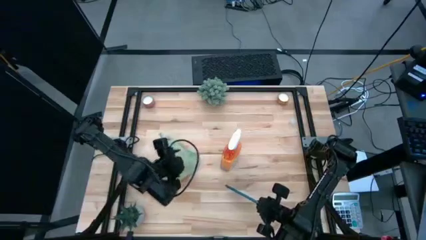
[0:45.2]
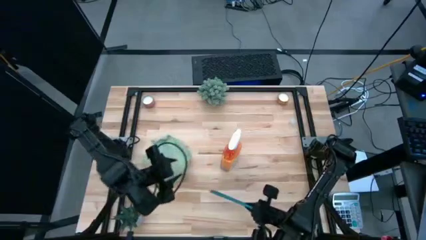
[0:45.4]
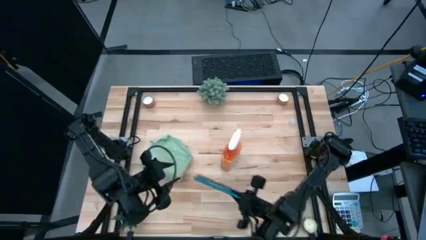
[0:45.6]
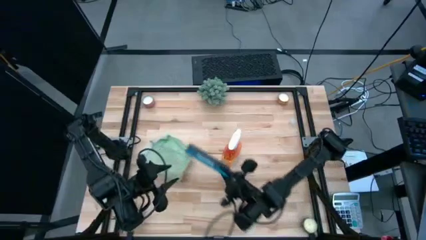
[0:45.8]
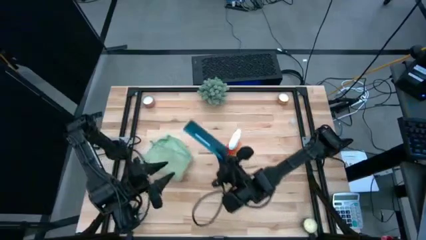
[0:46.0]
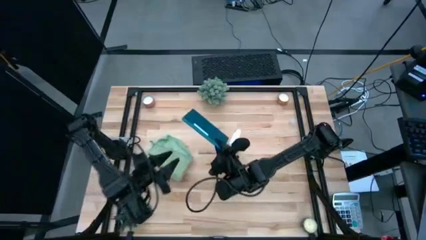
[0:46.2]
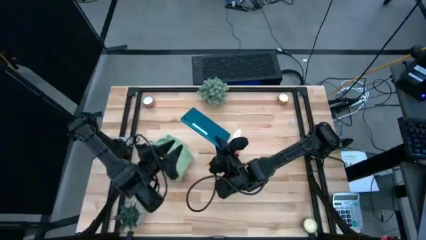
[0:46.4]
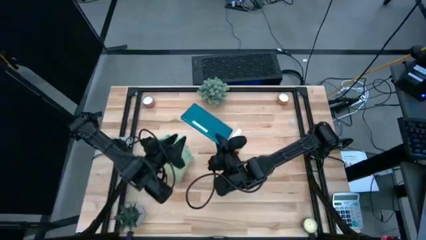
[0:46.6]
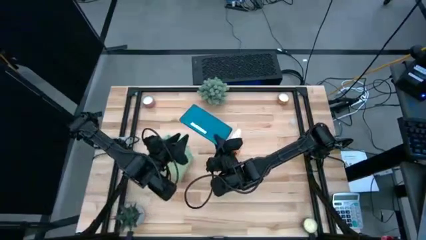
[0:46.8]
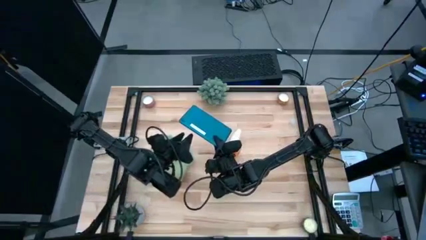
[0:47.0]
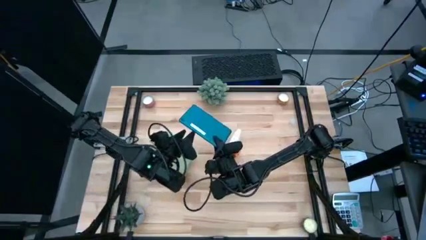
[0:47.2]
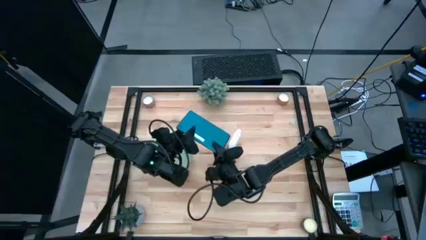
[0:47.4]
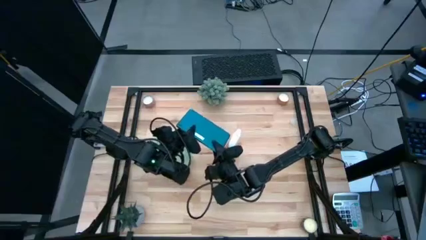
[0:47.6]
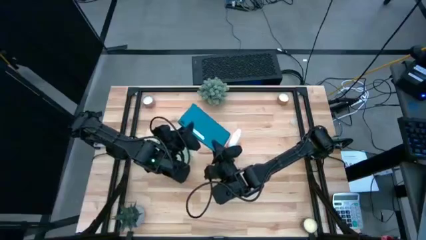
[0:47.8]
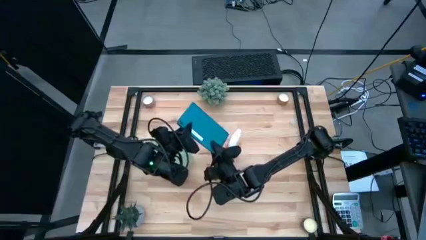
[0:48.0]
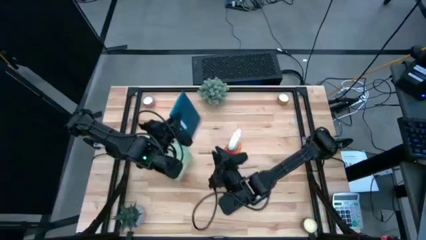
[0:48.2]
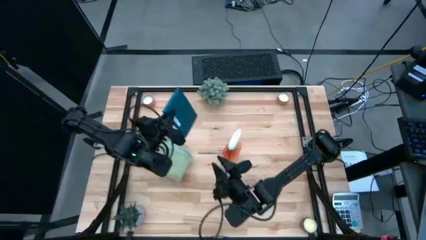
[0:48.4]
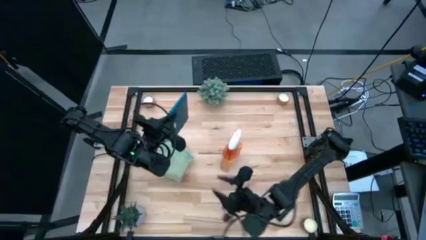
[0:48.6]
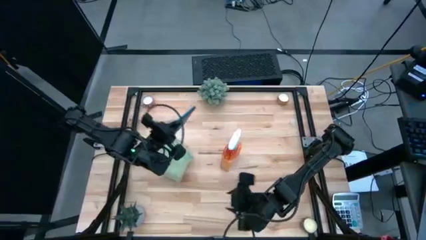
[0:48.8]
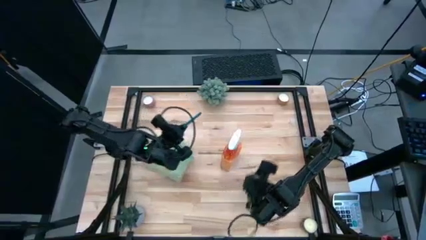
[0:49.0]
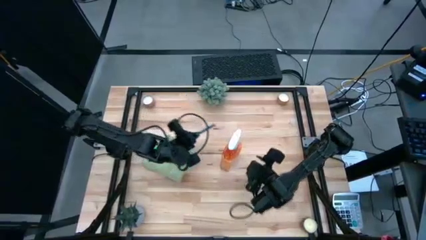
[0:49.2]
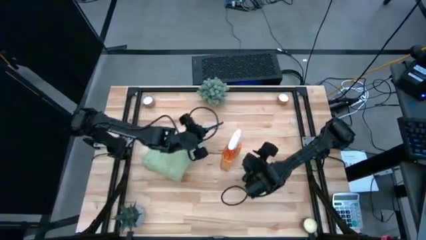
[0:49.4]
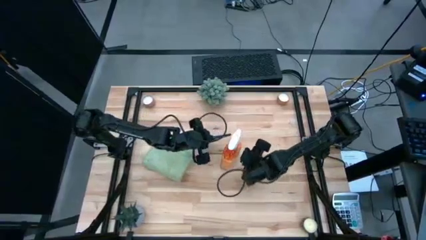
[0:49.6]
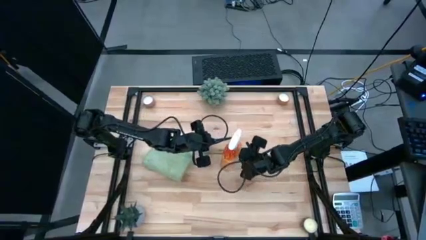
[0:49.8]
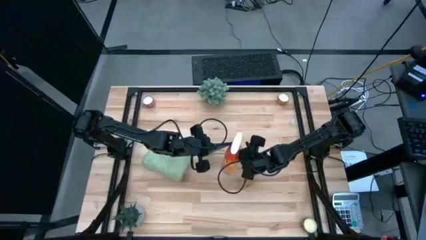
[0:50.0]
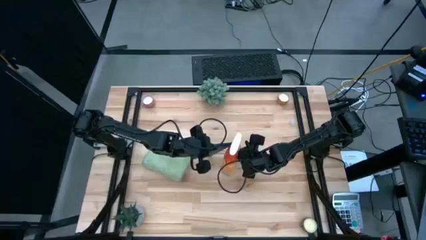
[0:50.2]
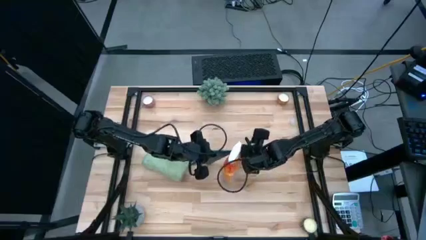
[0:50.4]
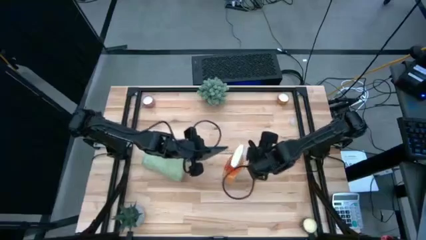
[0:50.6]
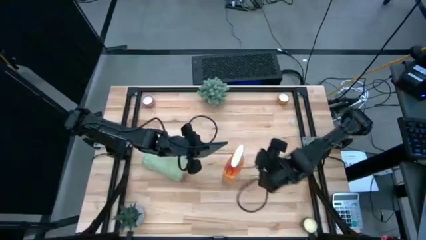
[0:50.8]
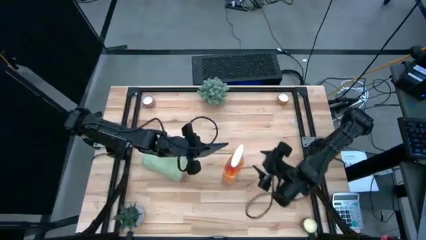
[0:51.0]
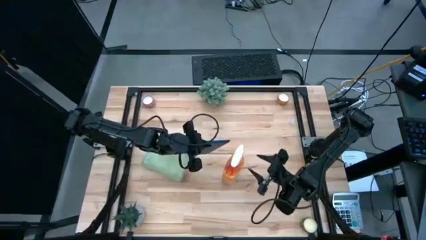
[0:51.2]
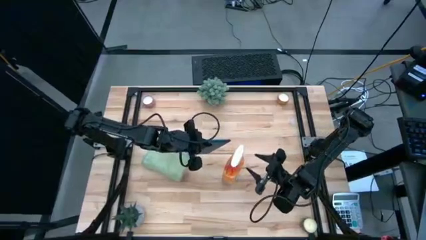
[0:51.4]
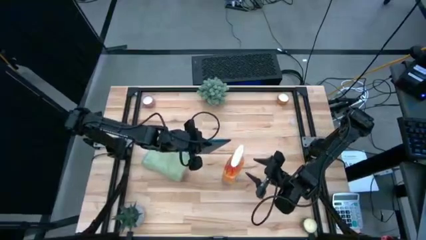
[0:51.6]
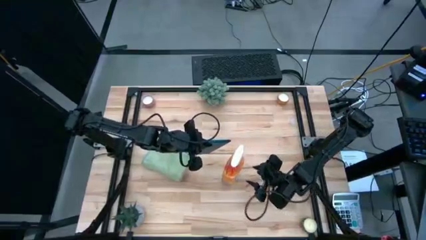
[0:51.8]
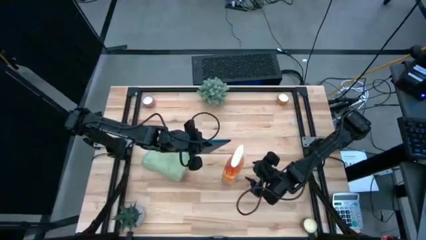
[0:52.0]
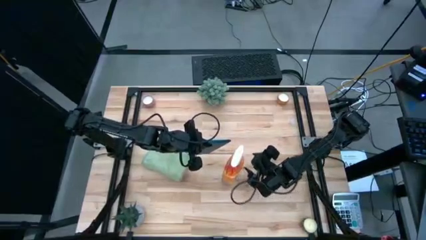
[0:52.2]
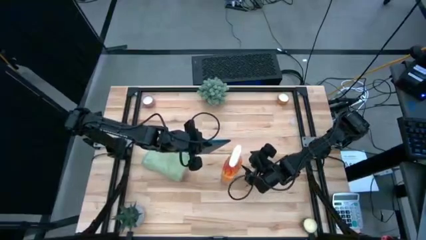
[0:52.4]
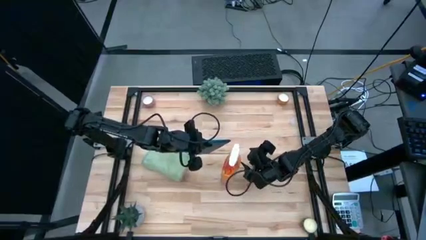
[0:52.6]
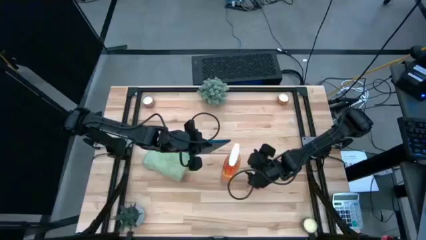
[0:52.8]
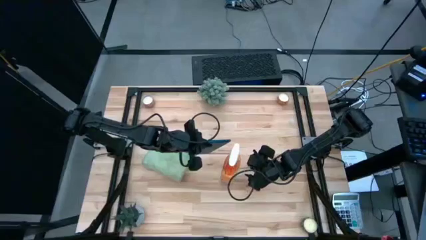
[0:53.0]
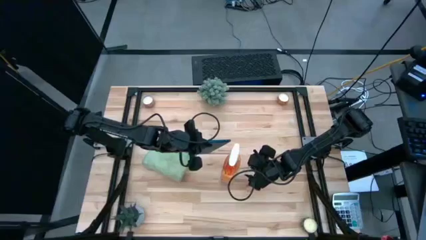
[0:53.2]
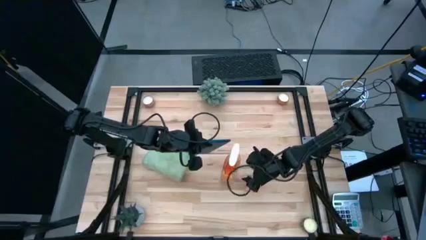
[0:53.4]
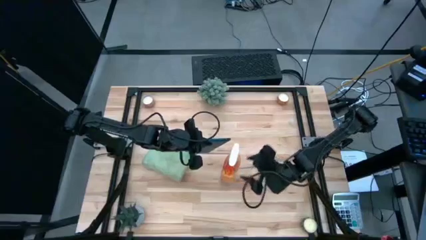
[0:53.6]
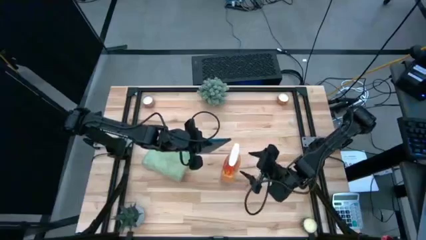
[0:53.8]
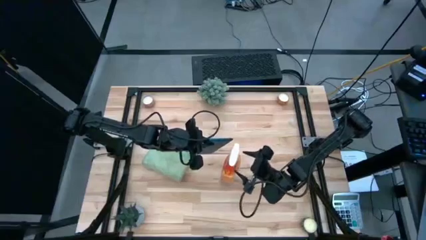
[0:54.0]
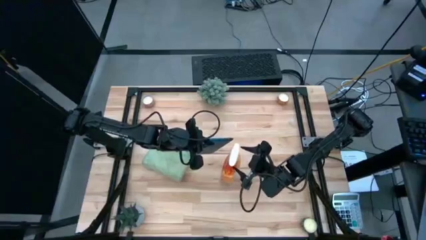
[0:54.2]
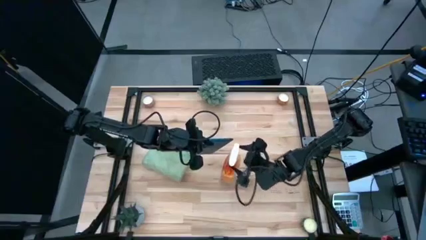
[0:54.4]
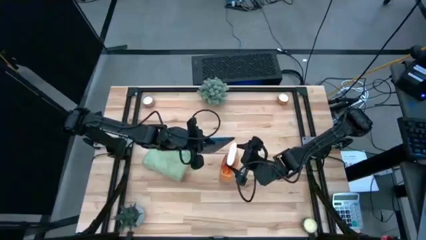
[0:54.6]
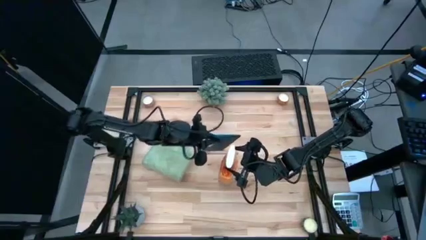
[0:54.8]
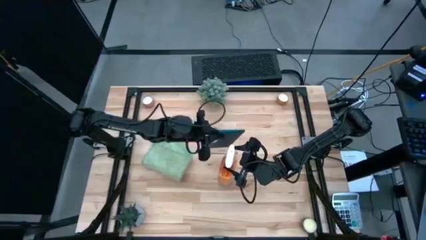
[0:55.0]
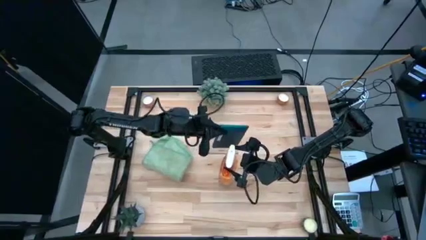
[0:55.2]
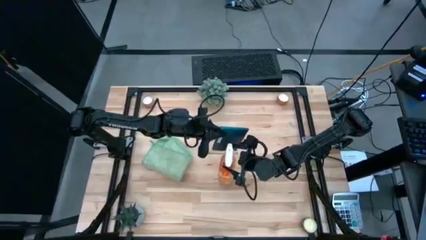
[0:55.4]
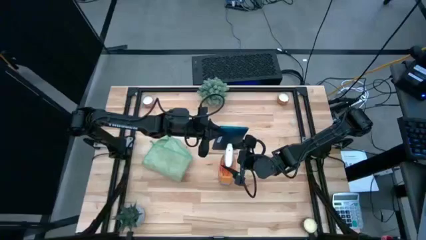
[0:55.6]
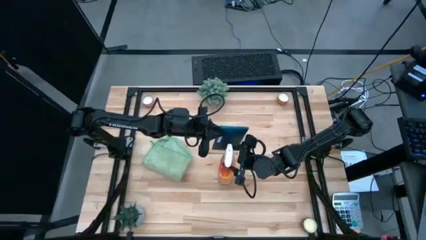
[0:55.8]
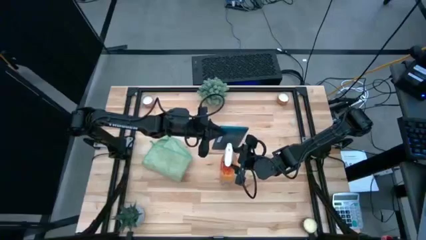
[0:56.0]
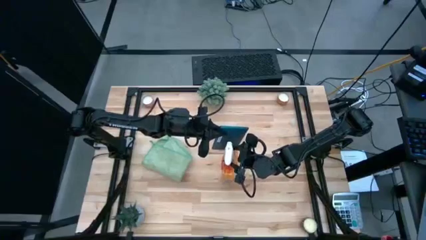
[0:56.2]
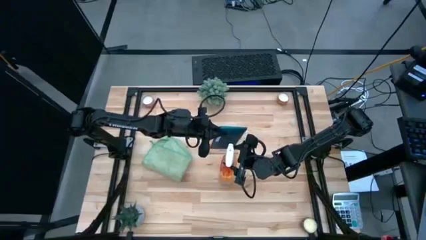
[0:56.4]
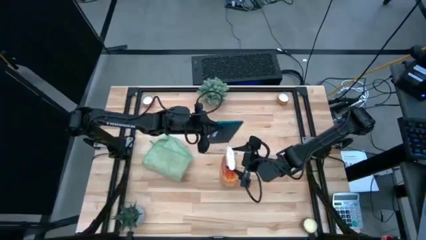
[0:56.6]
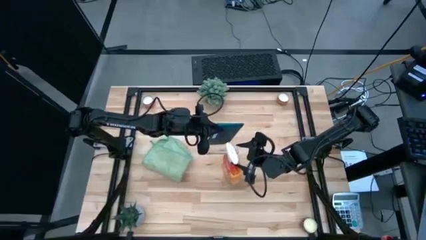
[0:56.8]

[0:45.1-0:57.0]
Task: Apply microfiber cloth
Spray the back of the blue tablet using the orange spray bottle
